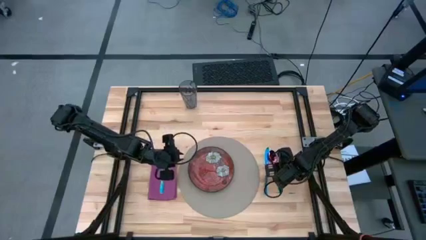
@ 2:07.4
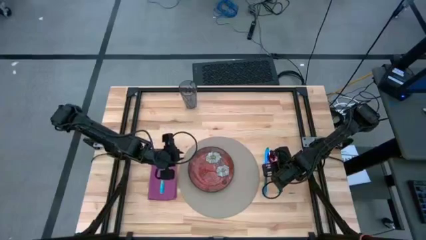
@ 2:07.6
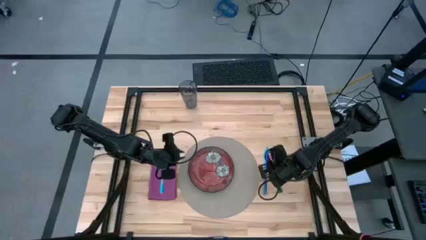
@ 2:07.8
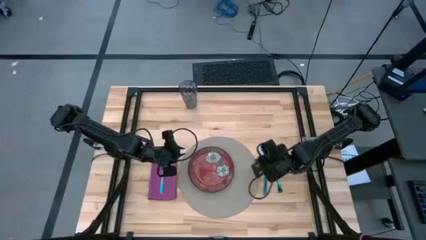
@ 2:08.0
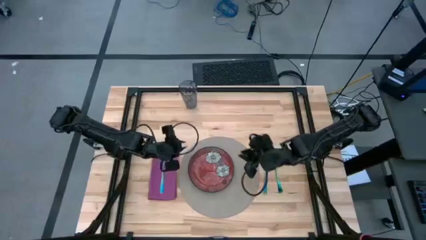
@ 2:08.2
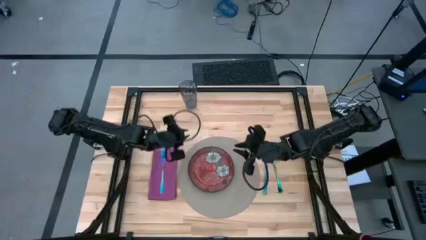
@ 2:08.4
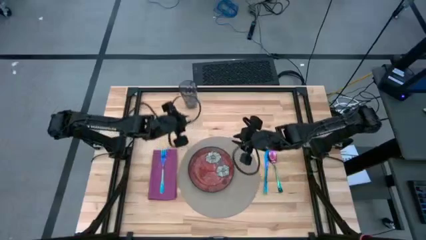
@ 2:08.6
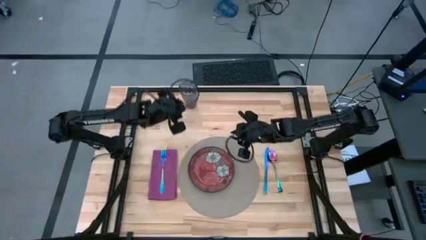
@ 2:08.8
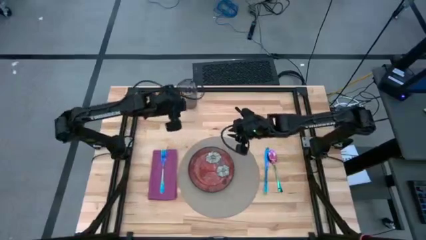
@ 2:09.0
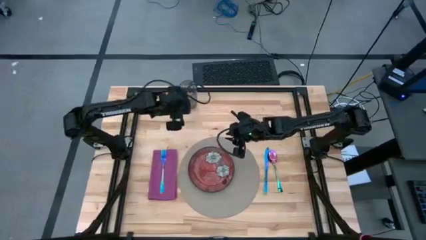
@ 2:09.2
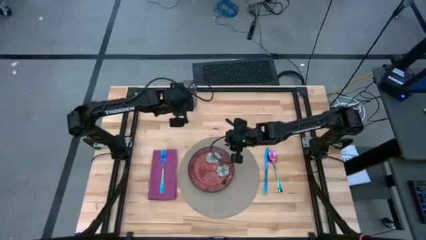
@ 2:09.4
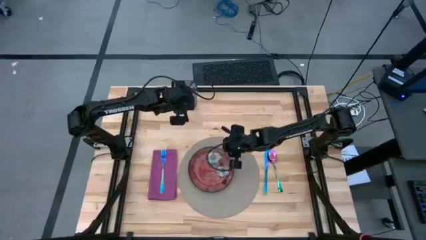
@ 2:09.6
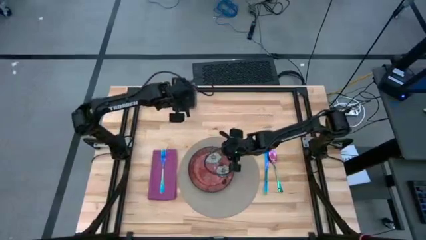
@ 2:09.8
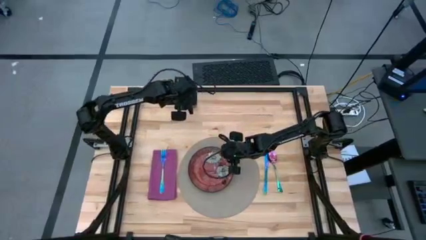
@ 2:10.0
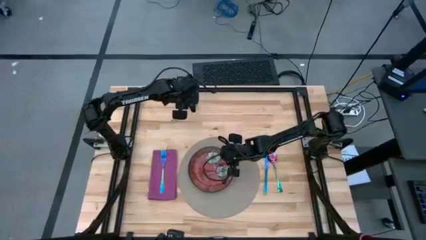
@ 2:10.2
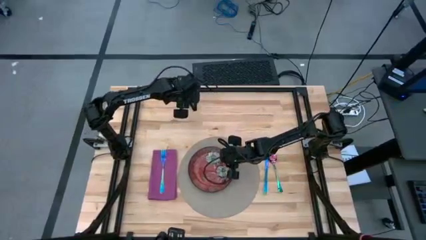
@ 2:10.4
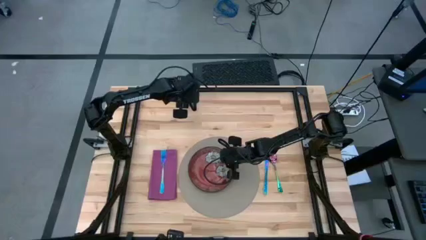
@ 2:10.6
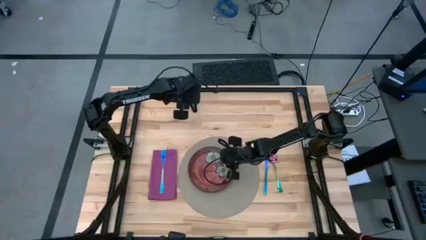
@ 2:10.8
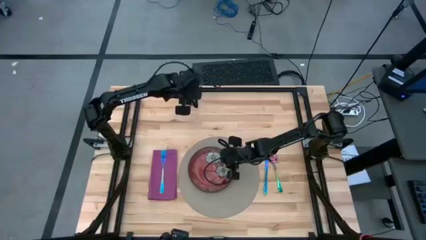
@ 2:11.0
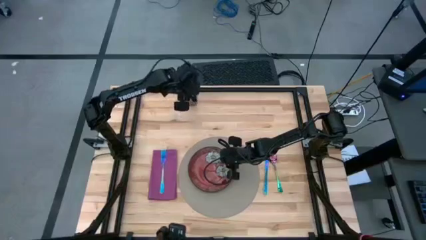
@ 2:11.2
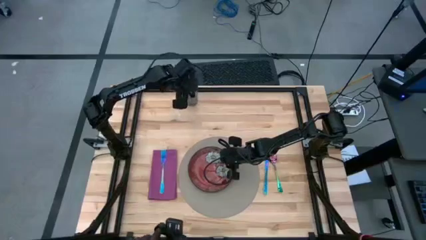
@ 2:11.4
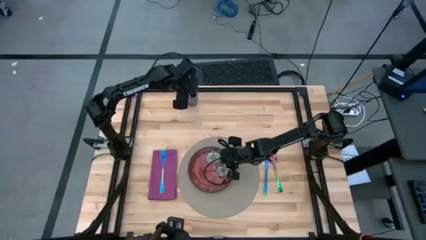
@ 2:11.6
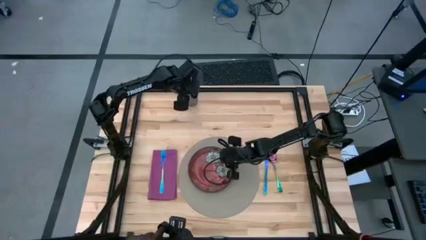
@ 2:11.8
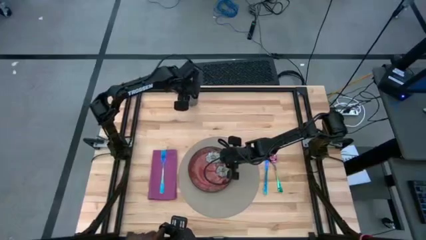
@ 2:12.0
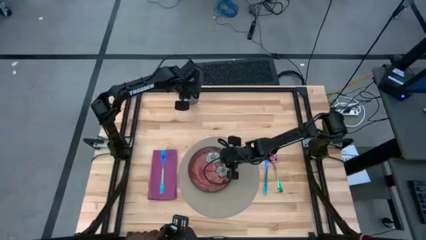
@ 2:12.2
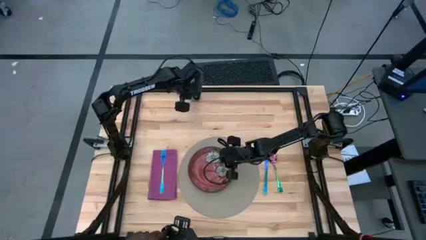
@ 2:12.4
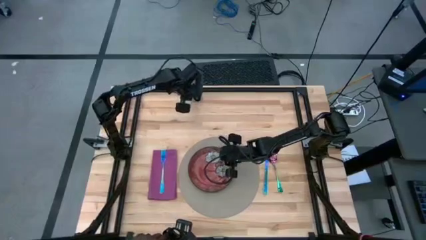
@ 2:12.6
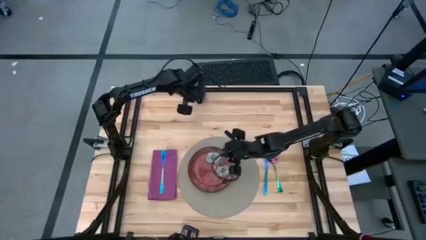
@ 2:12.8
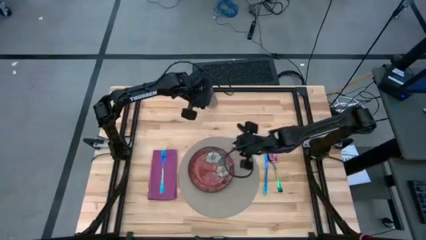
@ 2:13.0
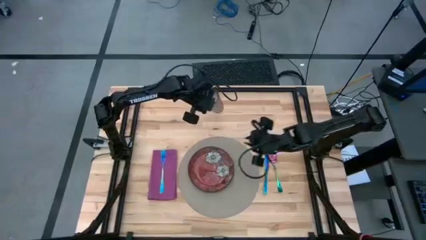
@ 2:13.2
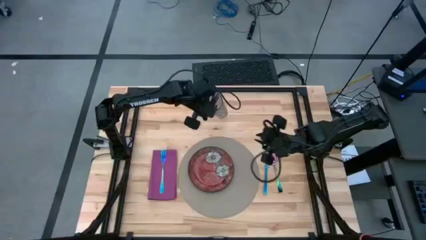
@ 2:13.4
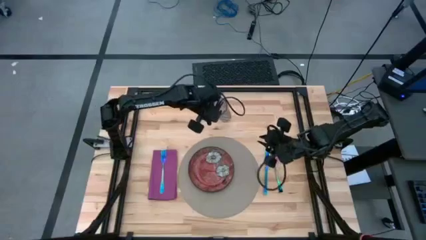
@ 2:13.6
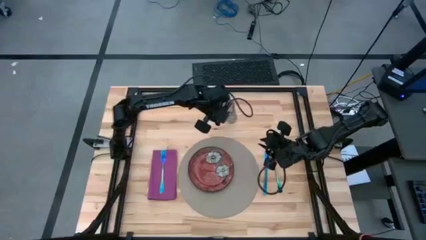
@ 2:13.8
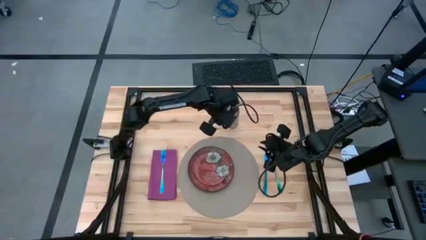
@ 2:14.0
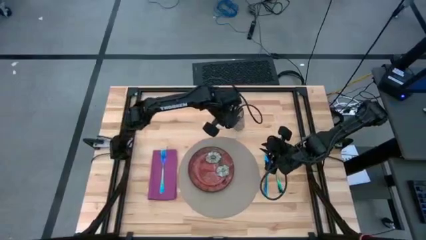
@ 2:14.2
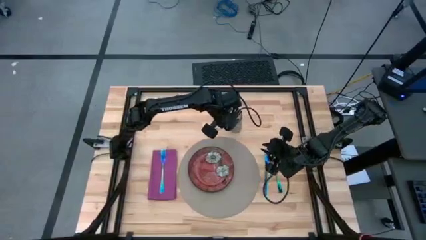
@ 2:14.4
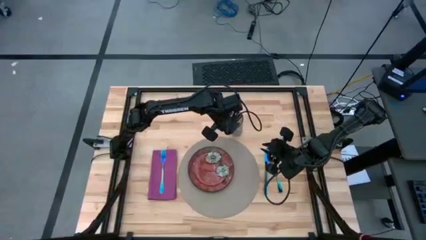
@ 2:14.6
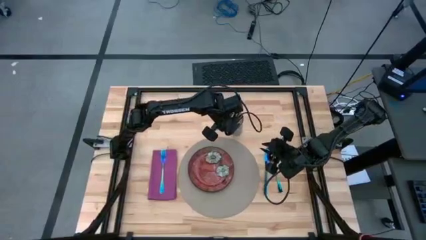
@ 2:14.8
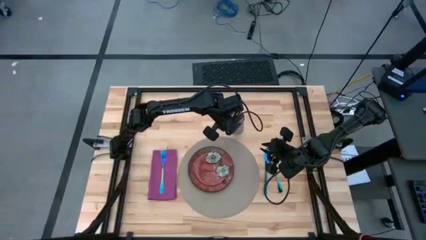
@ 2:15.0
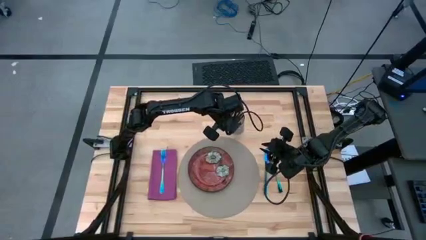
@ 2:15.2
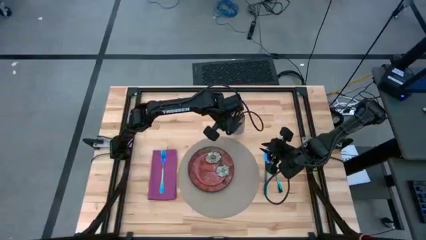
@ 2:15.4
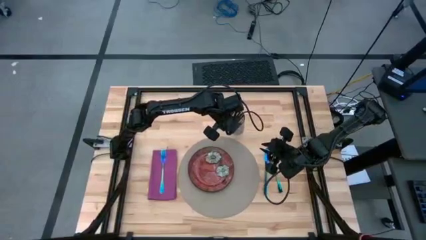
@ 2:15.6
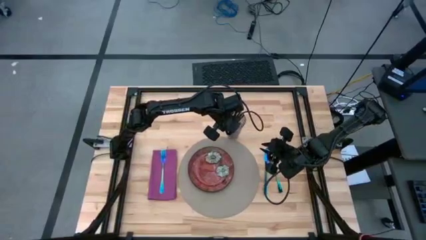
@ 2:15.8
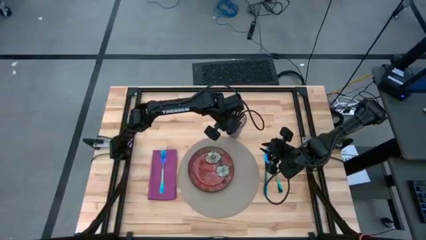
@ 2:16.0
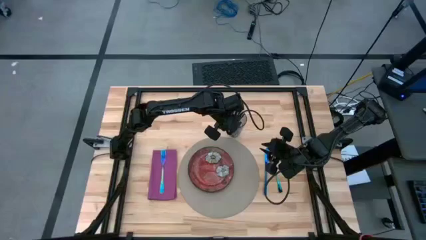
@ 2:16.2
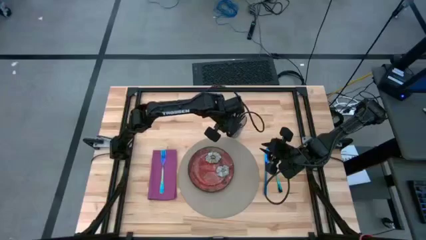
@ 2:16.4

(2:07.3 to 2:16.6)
Task: Set table place
Move the blue cup to the top right of the table

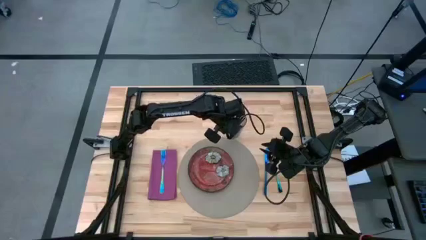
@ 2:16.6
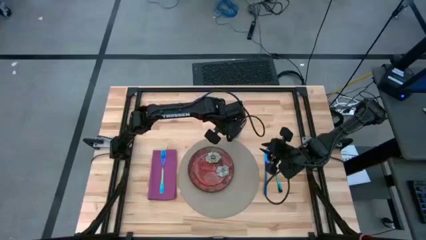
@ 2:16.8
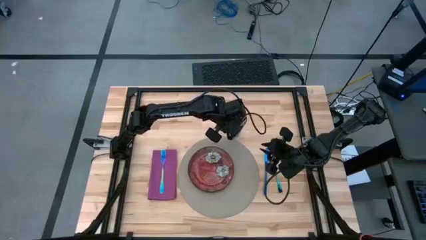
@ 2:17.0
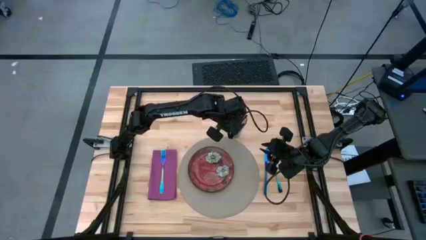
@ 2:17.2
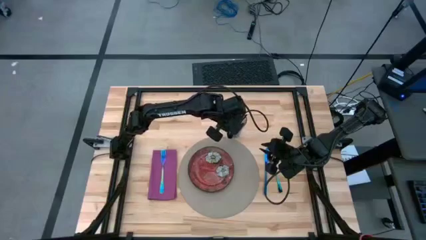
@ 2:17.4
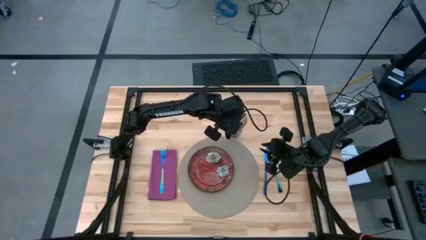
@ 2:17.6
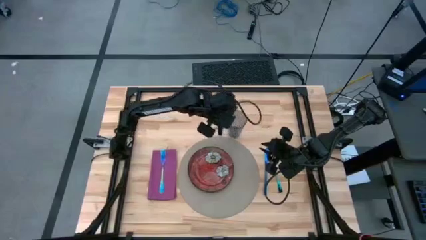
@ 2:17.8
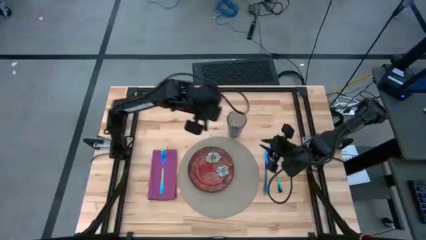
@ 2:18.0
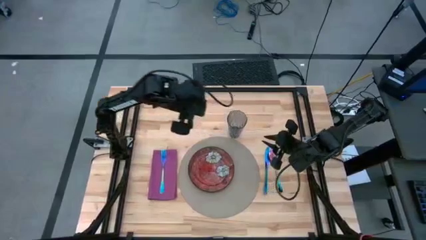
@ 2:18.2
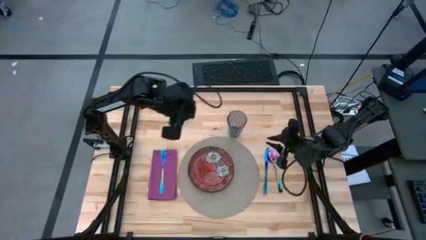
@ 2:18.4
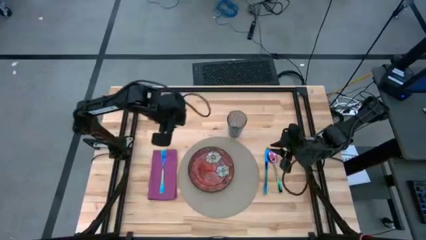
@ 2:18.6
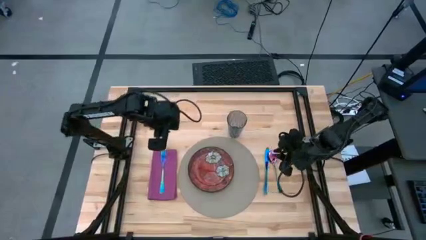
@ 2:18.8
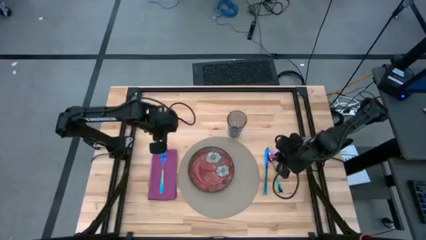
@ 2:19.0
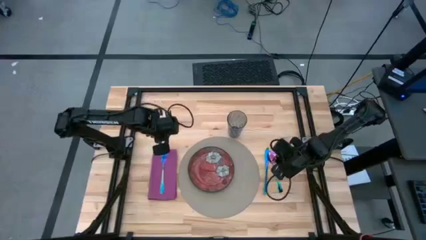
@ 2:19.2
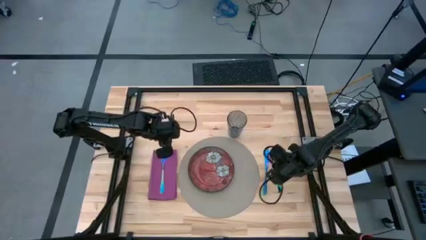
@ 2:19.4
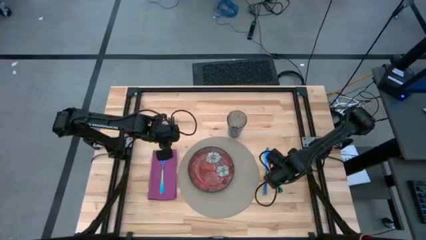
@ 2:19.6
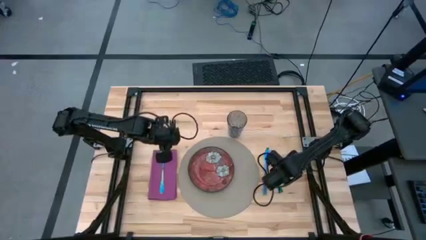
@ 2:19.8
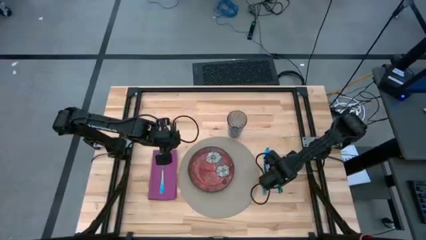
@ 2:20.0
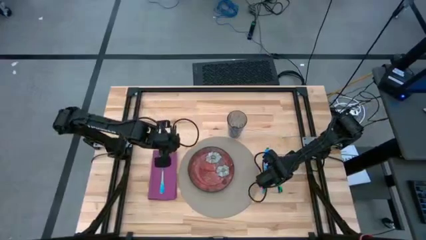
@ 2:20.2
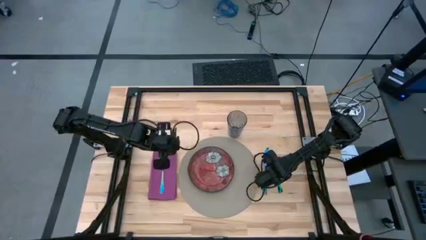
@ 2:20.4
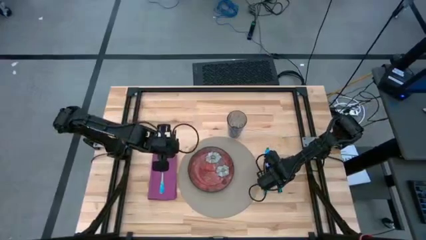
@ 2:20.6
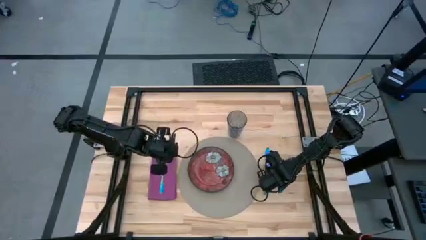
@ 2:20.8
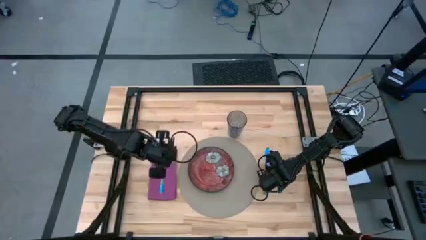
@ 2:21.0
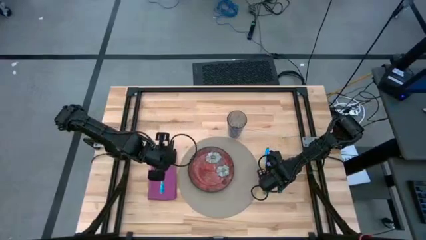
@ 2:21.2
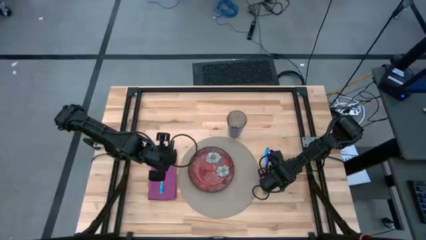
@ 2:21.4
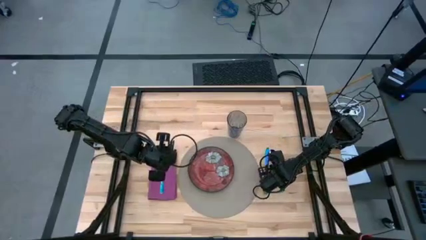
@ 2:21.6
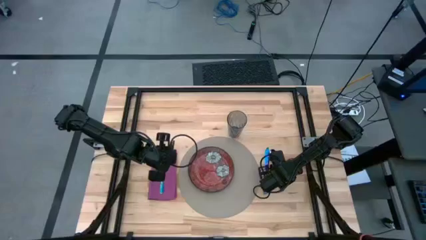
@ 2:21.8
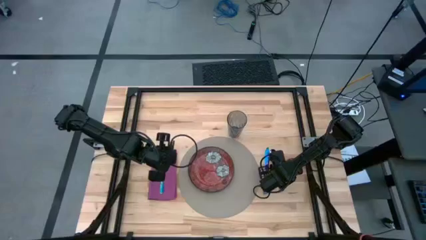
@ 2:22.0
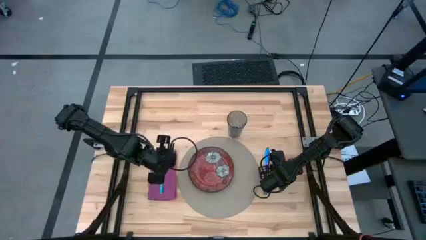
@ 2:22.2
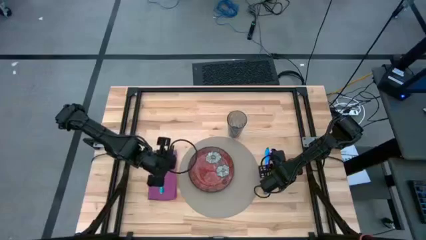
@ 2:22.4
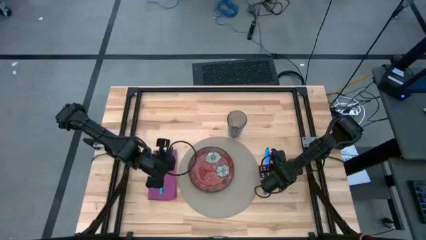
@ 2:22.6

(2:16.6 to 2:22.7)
Adjust the blue spoon

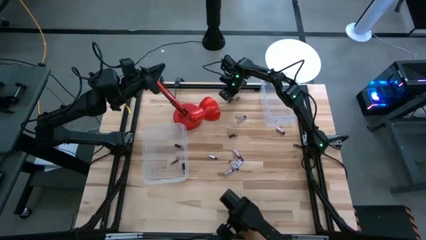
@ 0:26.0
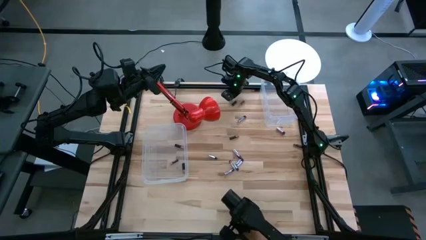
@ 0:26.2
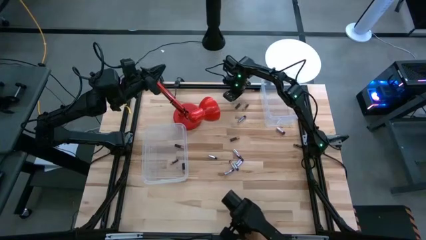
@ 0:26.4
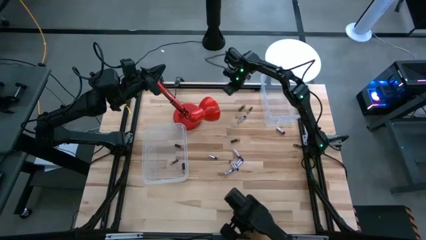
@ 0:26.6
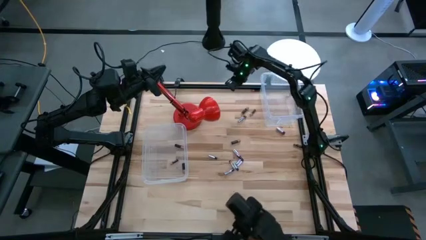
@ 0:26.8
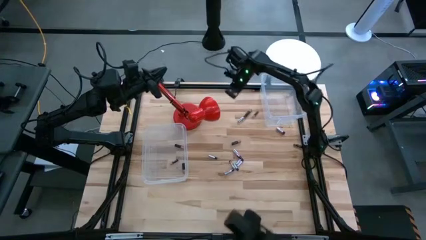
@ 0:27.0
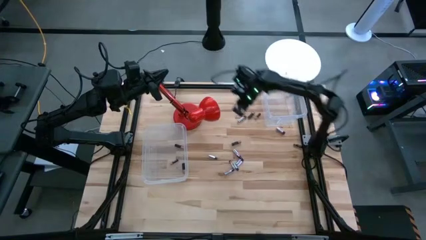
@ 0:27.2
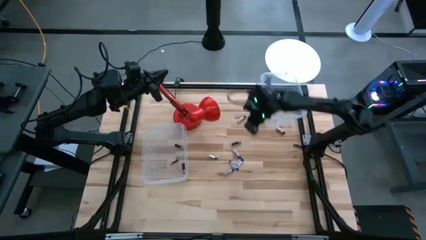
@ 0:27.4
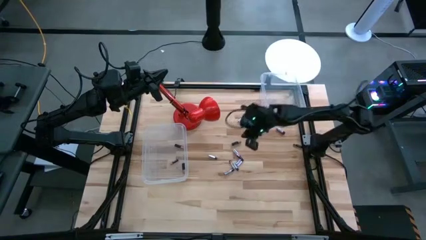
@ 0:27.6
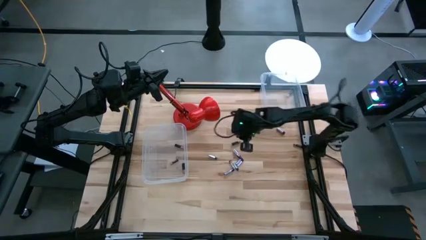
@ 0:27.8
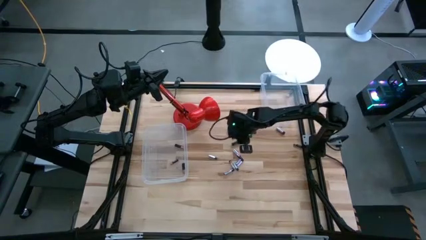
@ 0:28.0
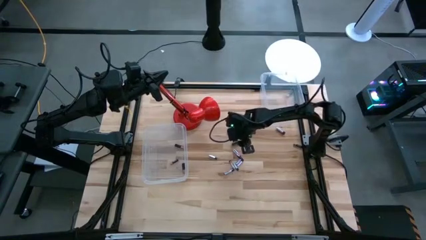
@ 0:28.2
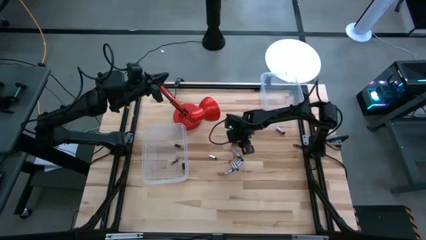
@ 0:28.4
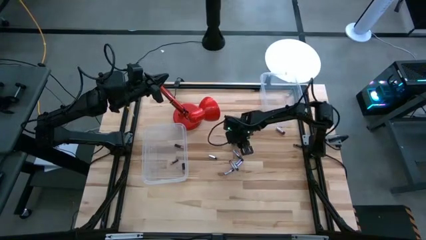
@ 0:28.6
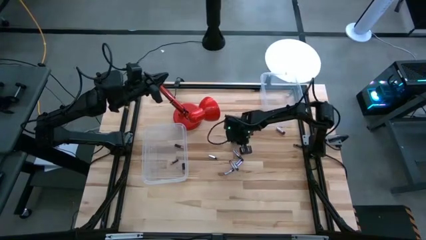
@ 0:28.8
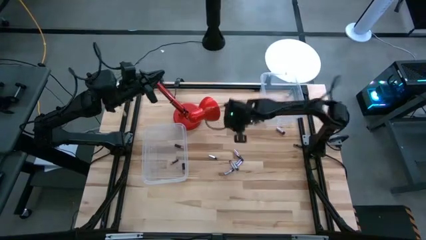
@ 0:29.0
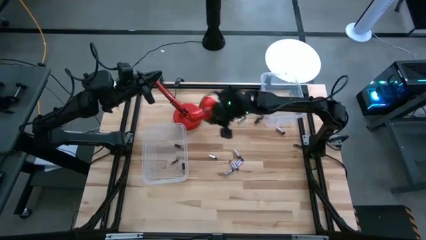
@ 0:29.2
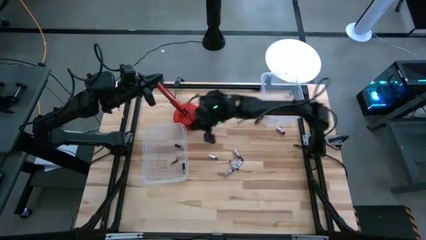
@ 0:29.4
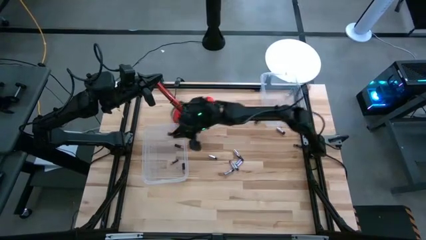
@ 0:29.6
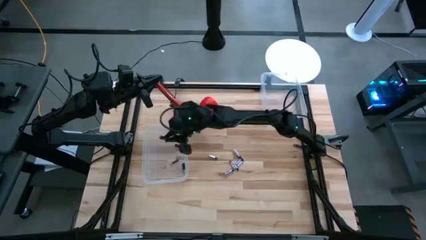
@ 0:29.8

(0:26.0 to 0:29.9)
Task: Sort batteries
Put the black battery into the bottom transparent bin
